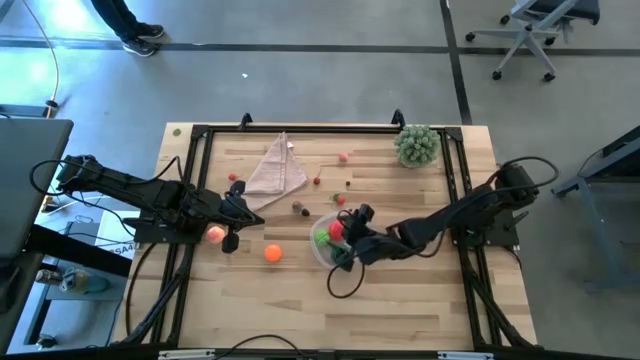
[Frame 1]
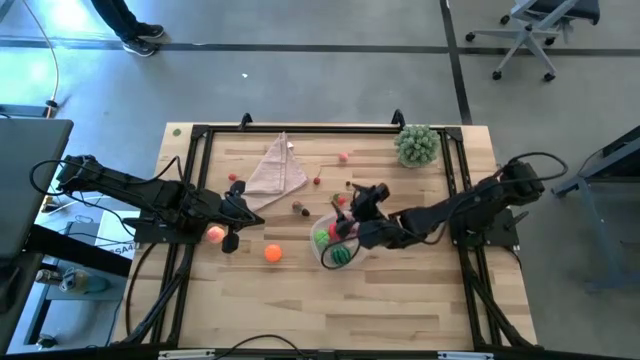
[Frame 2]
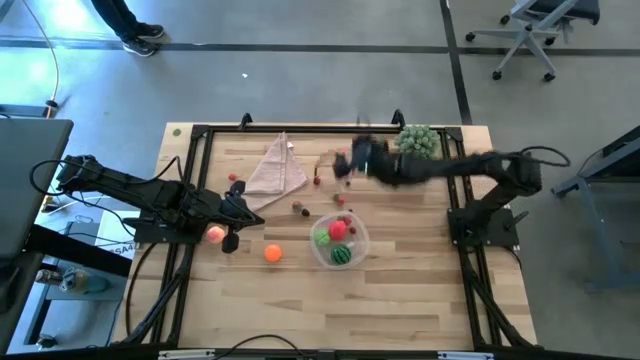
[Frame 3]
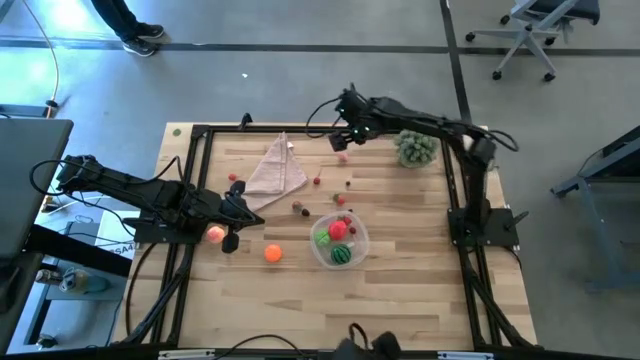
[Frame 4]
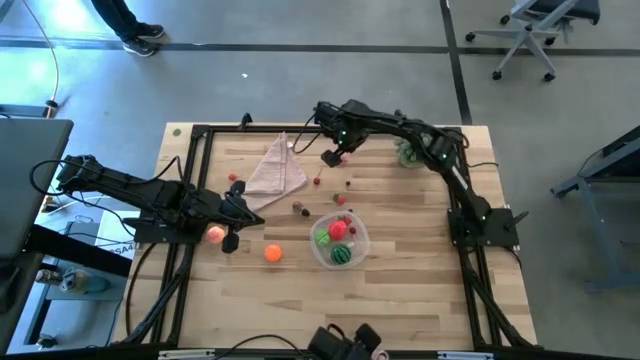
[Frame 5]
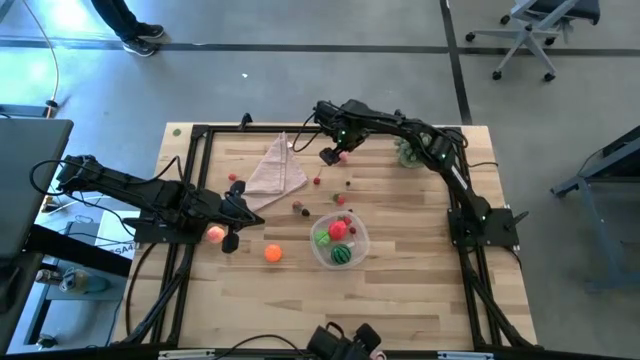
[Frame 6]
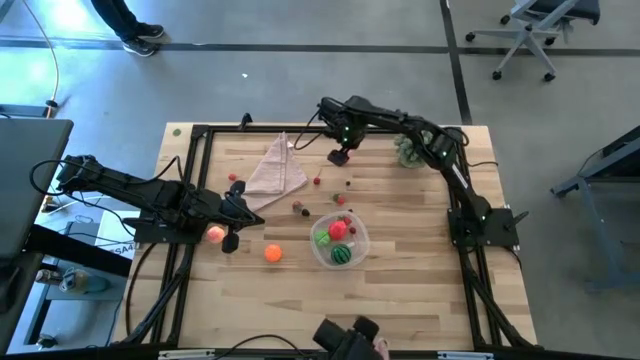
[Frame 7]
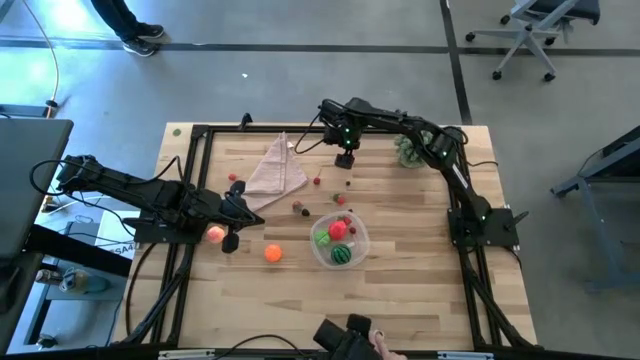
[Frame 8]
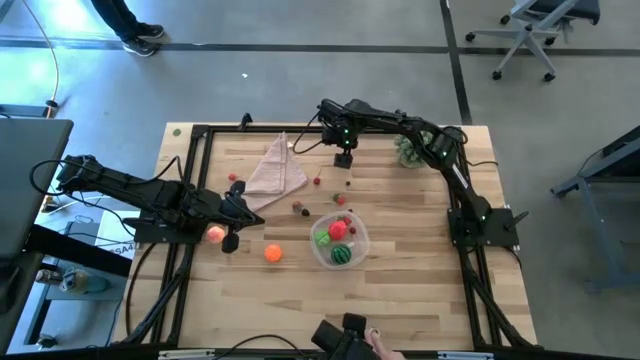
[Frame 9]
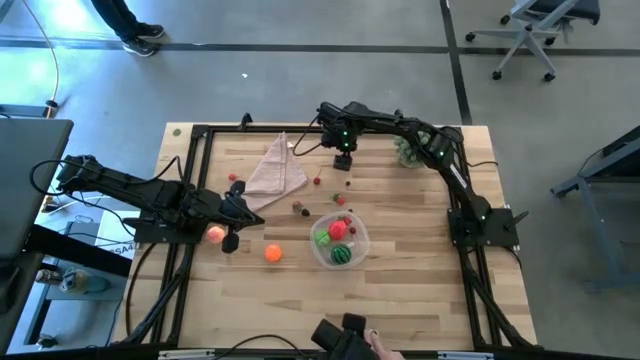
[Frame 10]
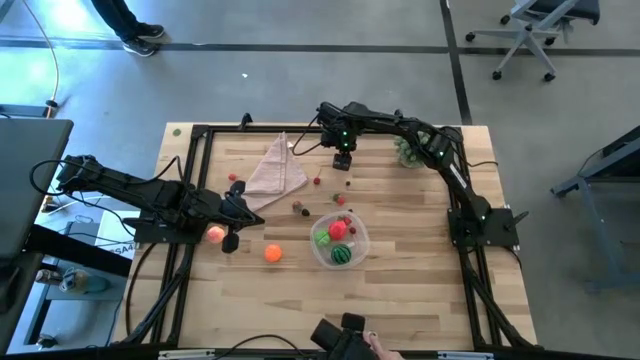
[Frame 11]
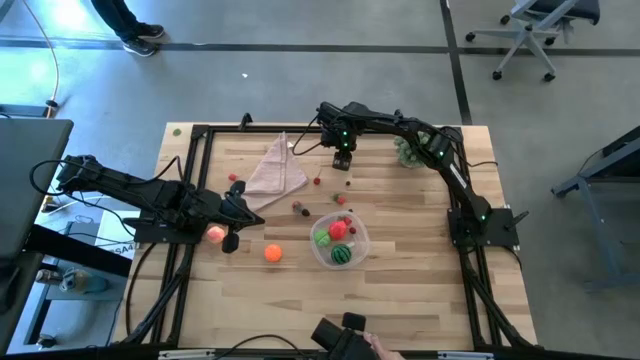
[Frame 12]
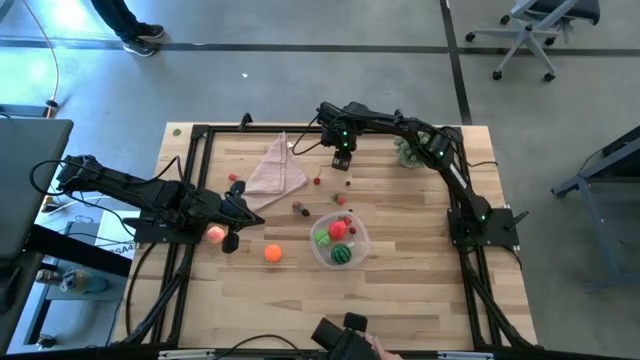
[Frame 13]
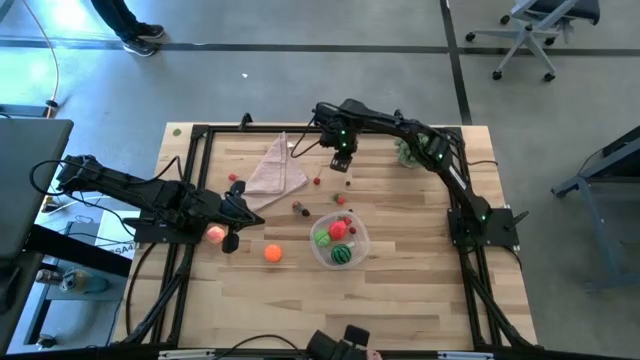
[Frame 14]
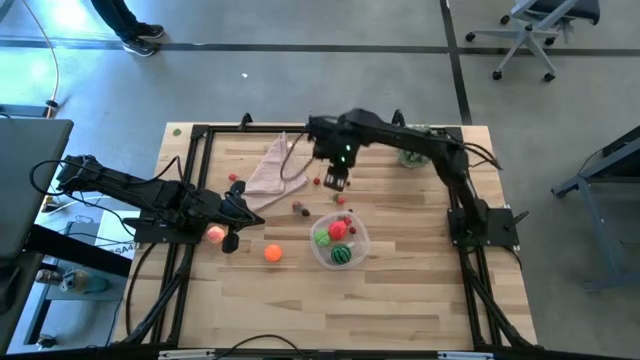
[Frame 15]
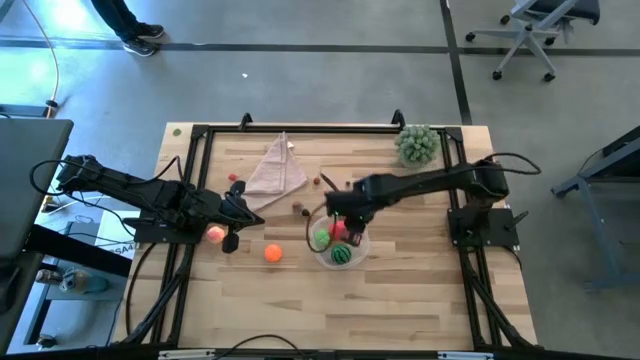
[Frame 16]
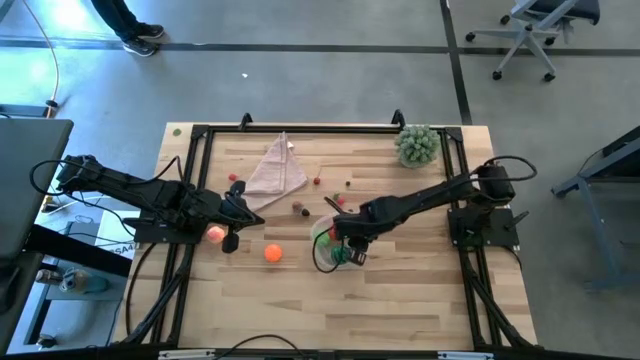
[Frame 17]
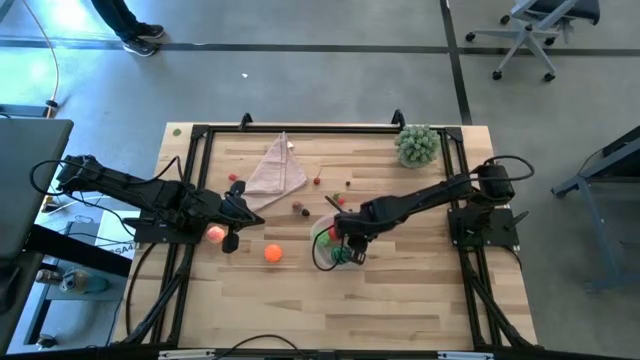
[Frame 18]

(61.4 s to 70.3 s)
Task: Pick and placing Produce into tupperware
Put the top peach into the transparent bin

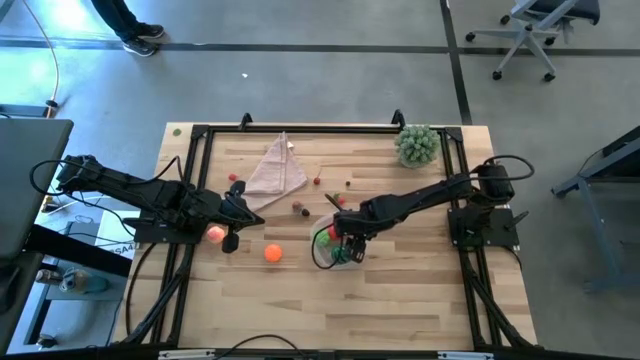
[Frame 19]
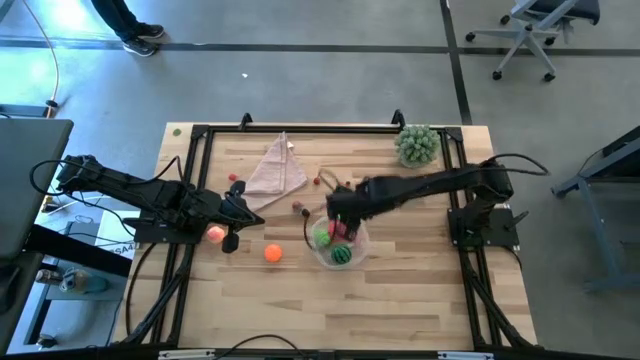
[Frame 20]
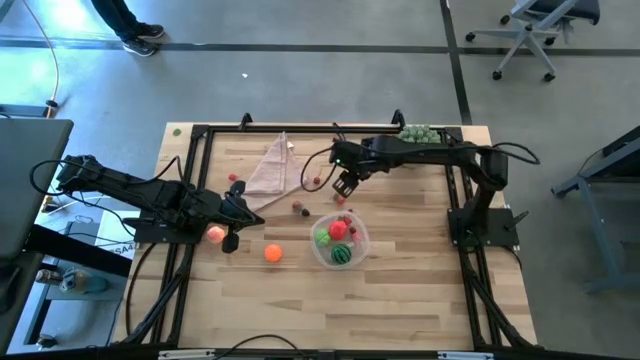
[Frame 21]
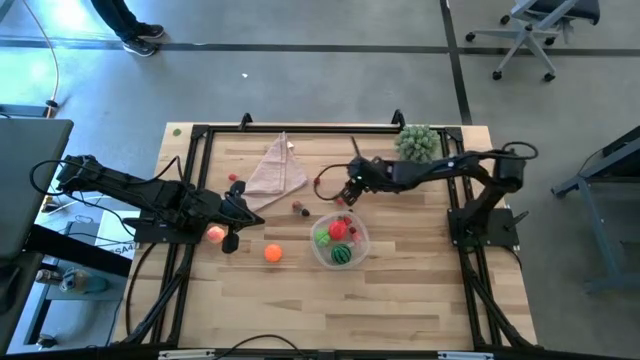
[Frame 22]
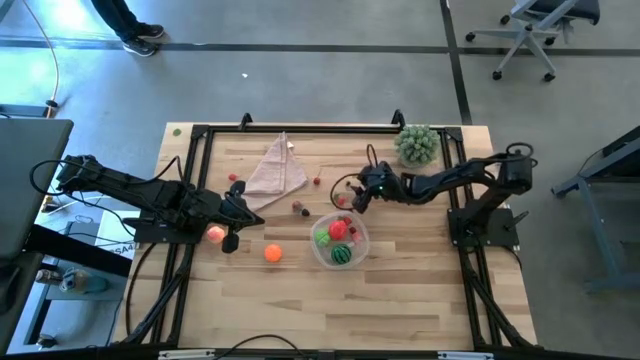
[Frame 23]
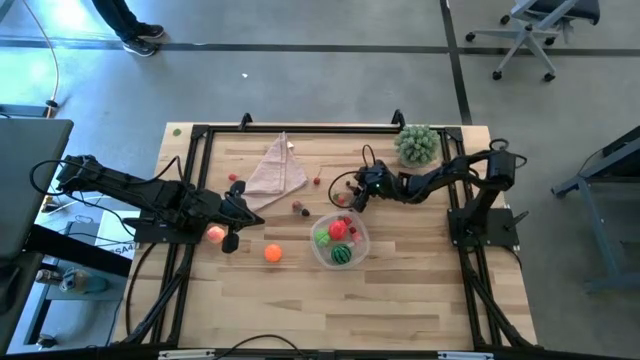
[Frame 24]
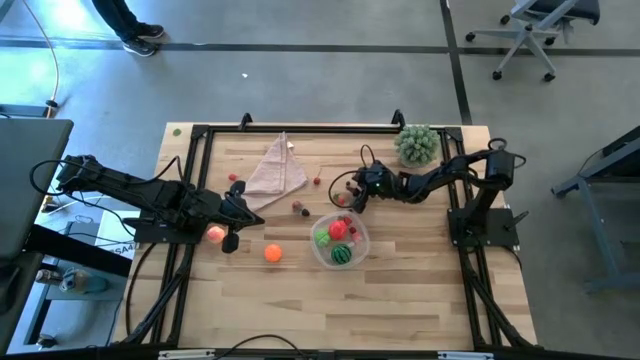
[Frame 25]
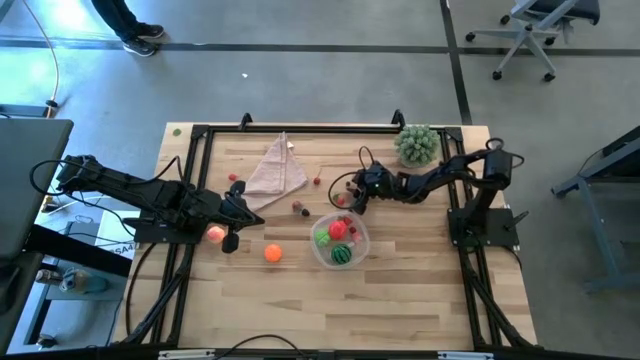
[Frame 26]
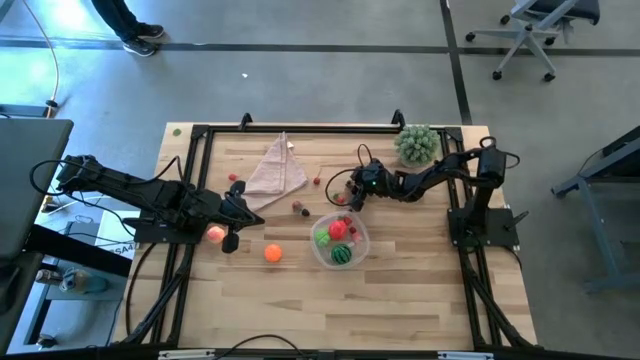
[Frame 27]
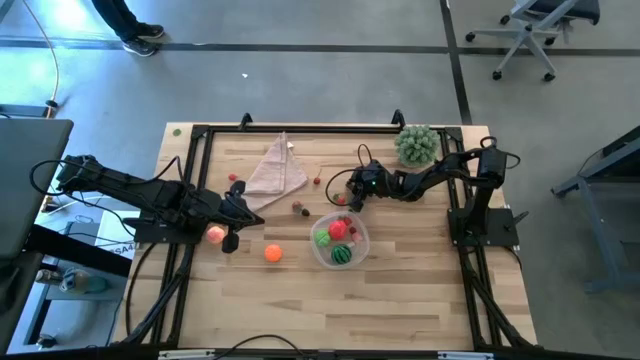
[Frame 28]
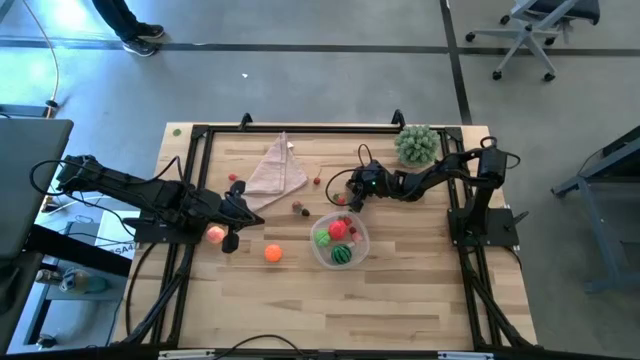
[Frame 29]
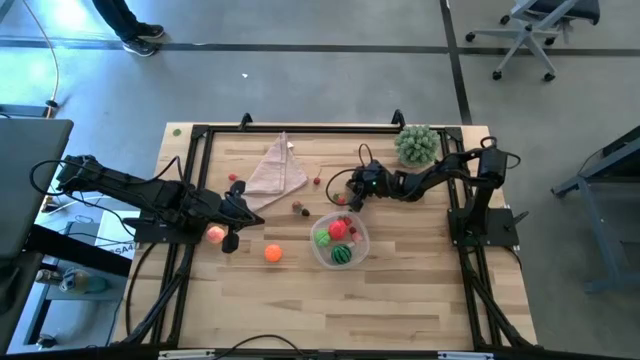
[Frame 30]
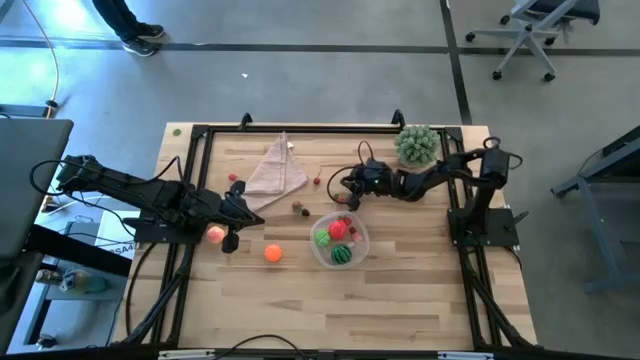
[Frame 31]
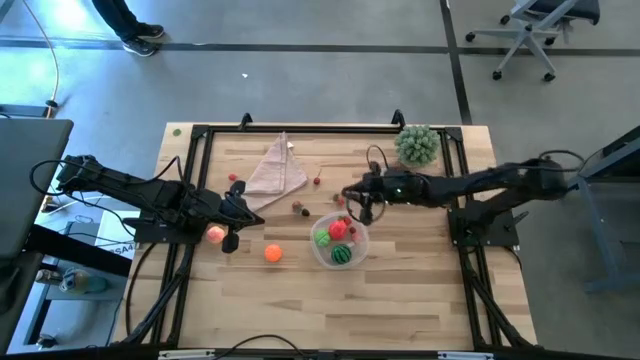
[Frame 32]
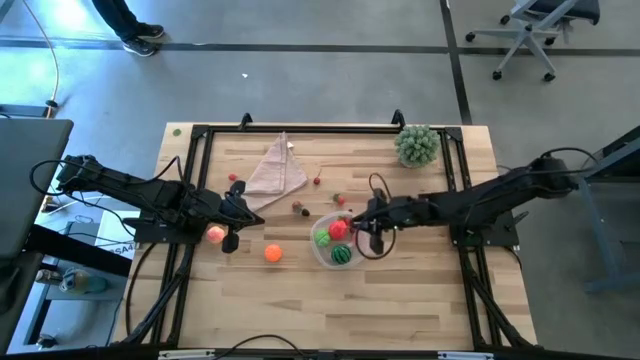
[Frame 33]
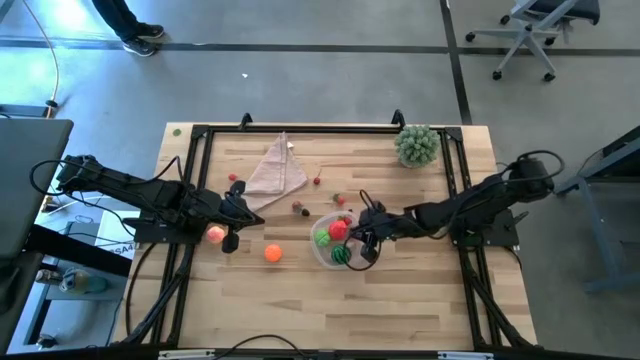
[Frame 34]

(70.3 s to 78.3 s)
Put the top blueberry into the transparent bin

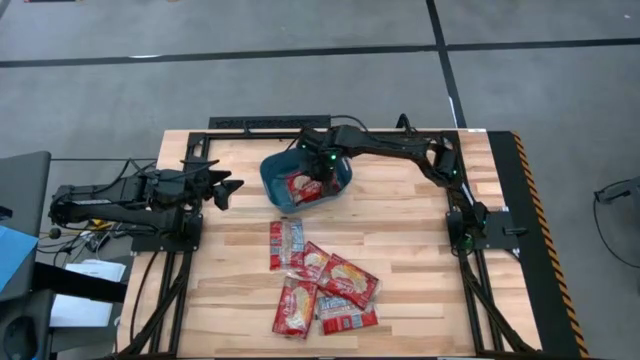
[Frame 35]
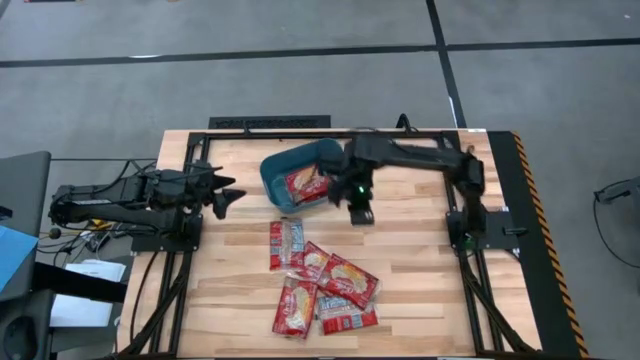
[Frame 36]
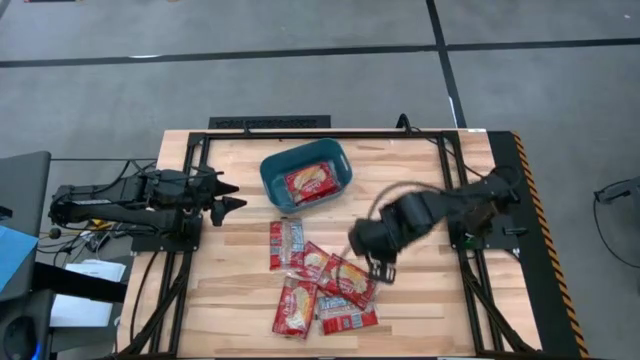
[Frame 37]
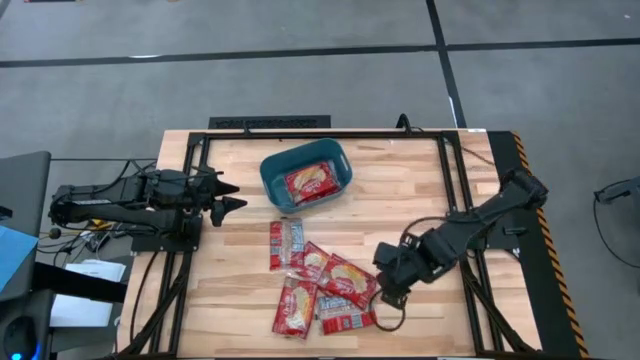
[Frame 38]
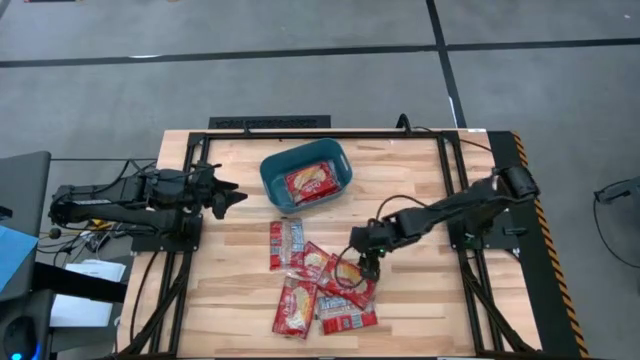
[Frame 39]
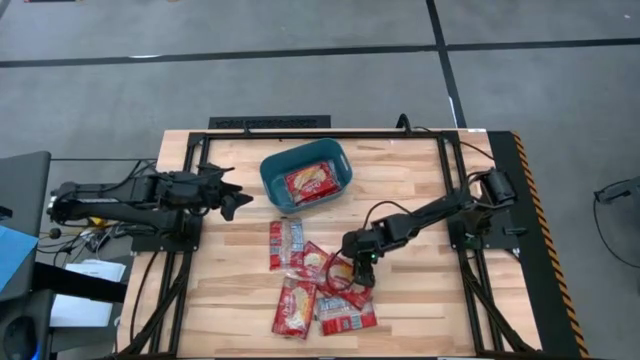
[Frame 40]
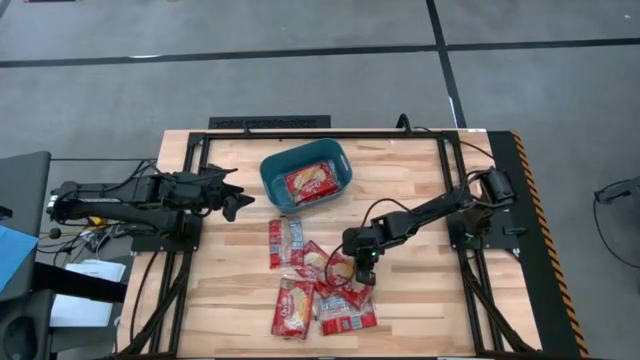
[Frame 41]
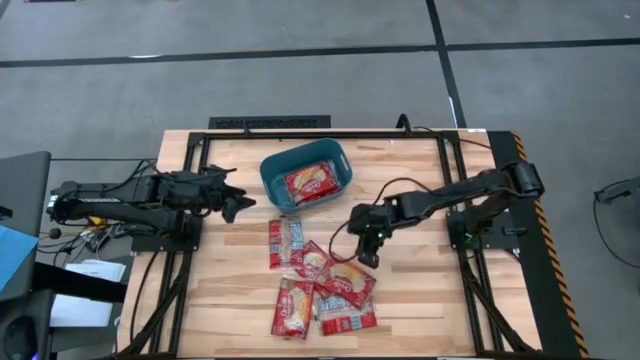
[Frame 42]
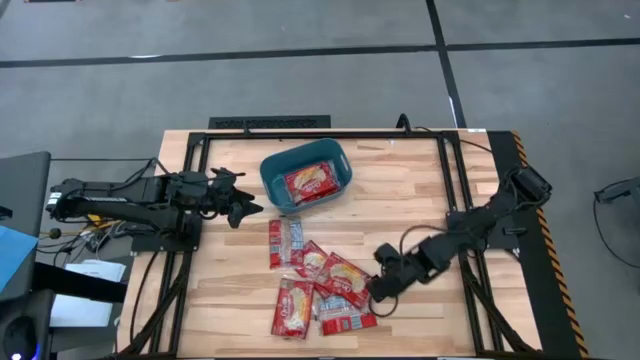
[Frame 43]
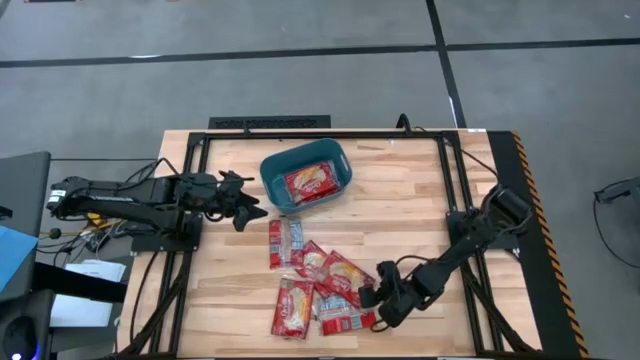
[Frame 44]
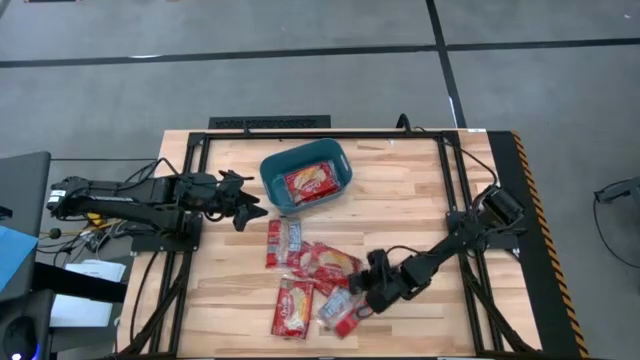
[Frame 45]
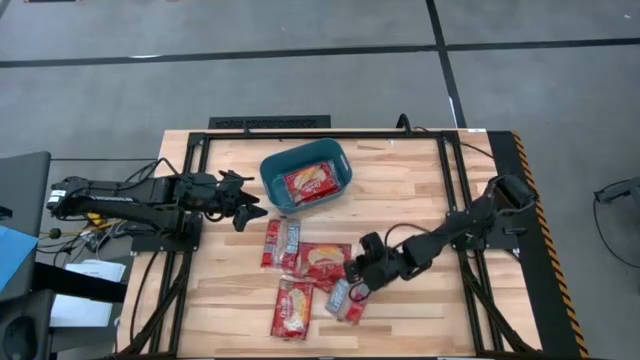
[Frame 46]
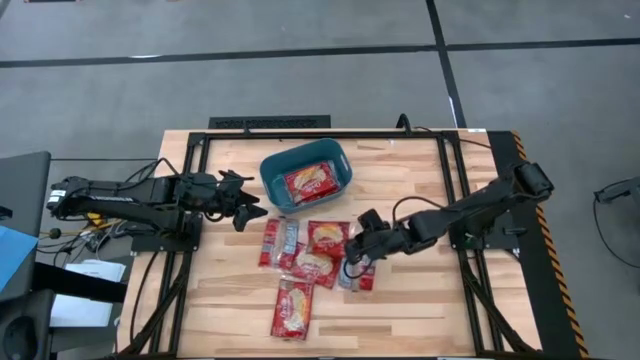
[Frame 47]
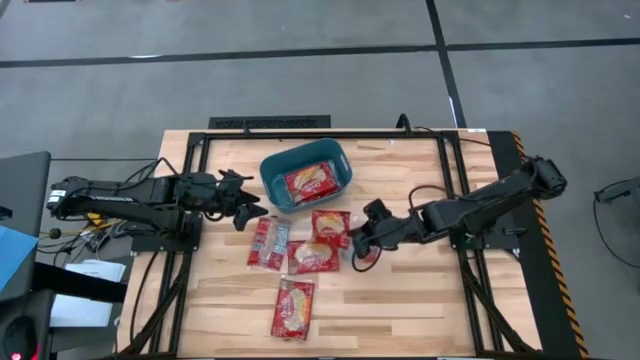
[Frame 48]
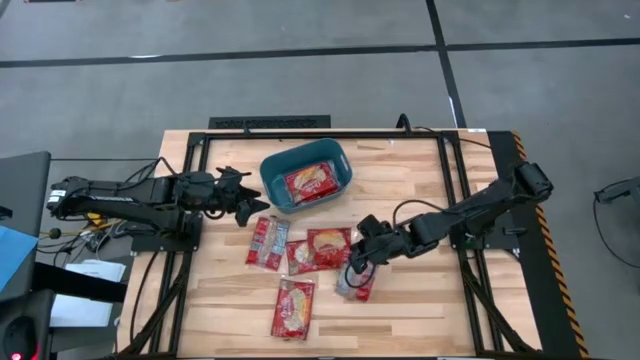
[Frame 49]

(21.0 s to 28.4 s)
Task: Sort popcorn bags into baskets
Put the red popcorn bag into the blue bin
